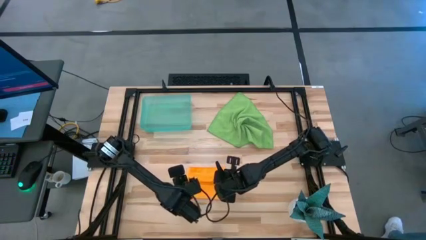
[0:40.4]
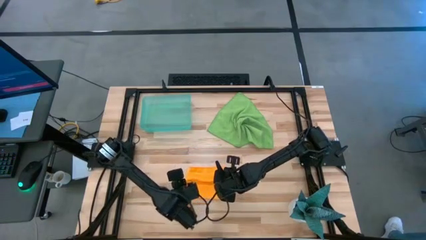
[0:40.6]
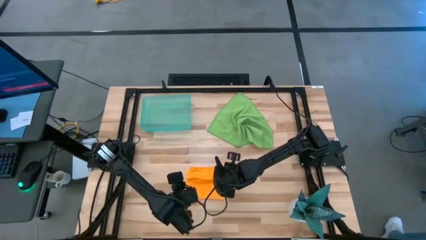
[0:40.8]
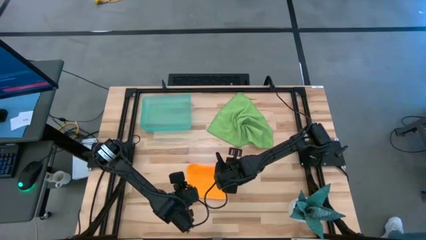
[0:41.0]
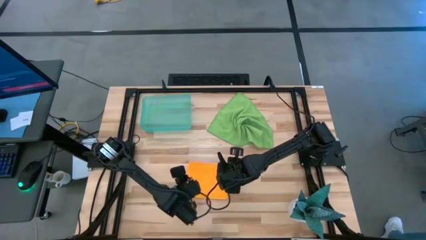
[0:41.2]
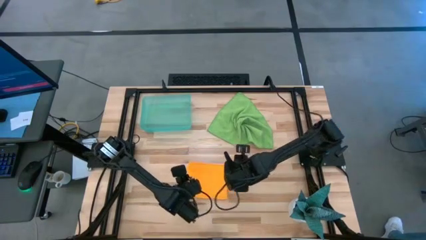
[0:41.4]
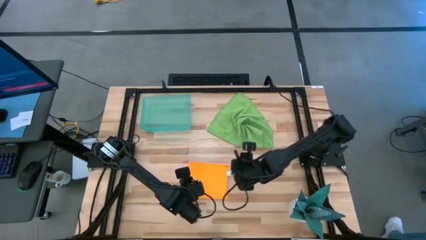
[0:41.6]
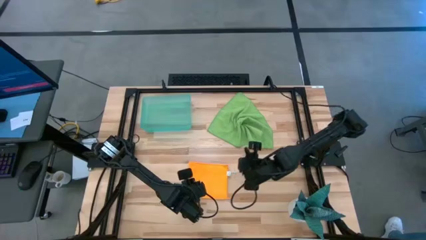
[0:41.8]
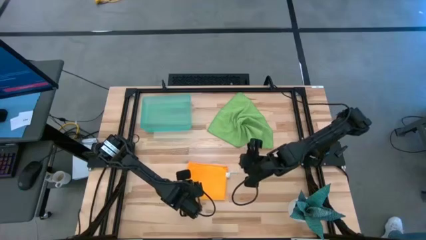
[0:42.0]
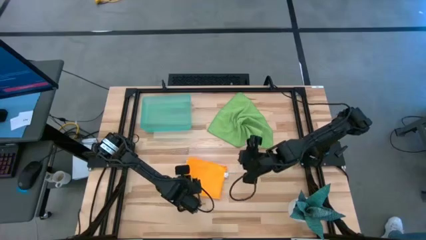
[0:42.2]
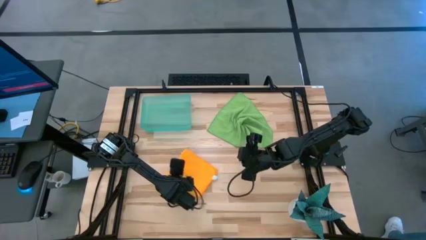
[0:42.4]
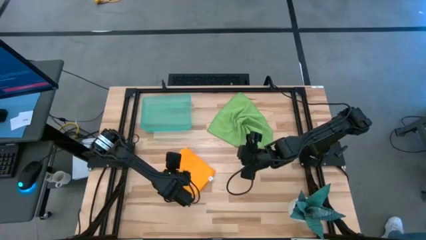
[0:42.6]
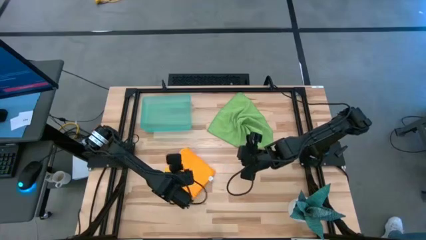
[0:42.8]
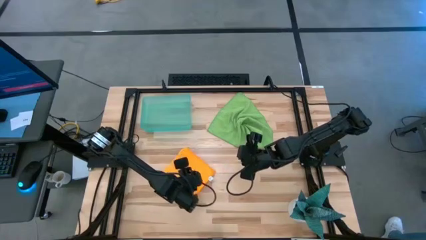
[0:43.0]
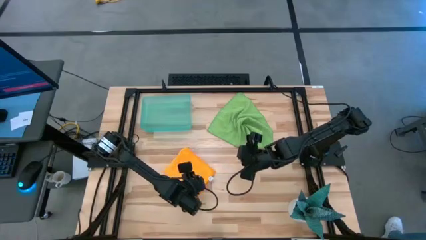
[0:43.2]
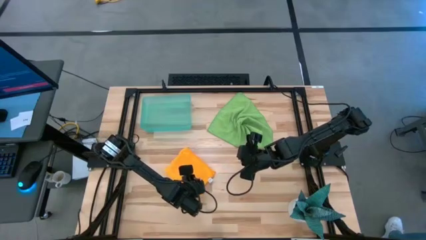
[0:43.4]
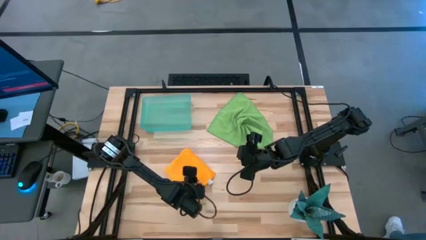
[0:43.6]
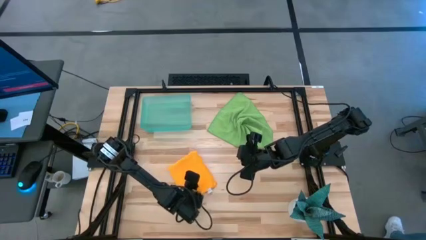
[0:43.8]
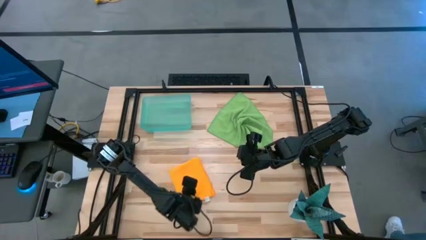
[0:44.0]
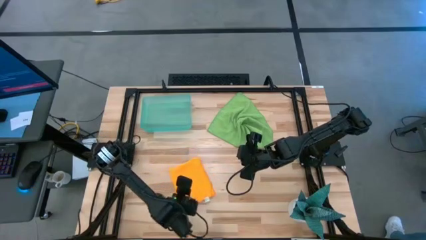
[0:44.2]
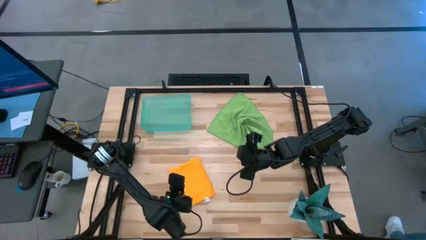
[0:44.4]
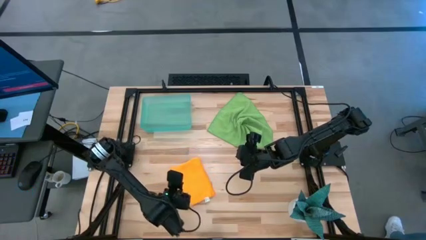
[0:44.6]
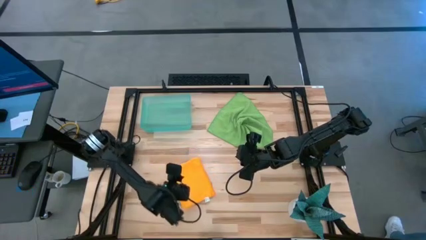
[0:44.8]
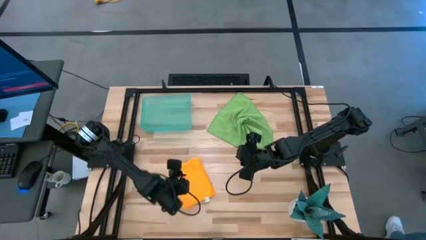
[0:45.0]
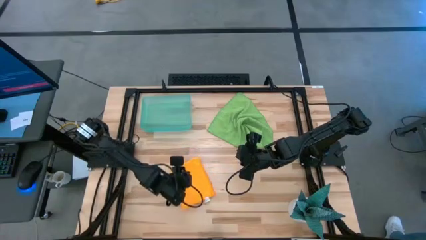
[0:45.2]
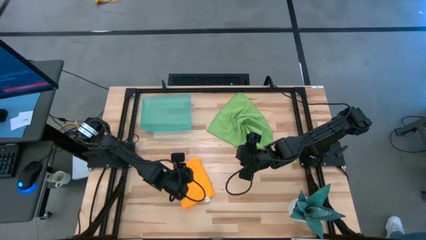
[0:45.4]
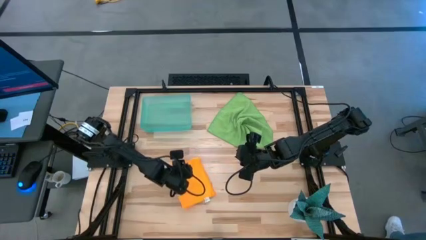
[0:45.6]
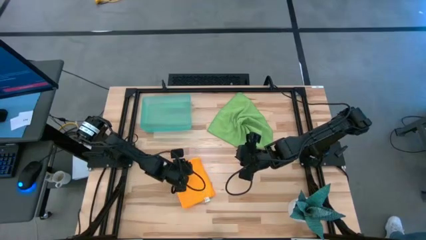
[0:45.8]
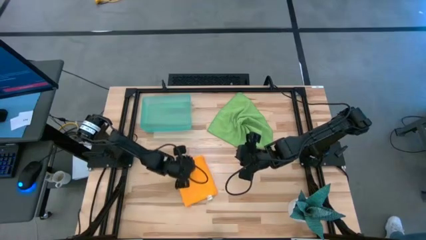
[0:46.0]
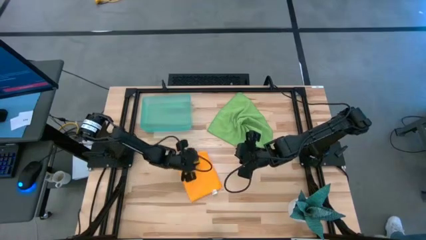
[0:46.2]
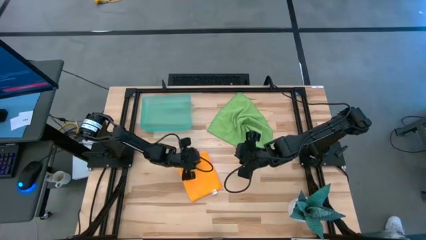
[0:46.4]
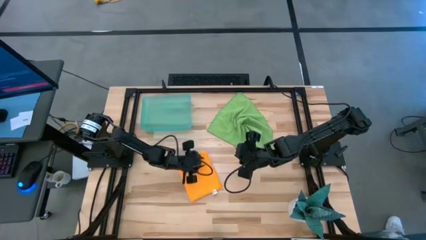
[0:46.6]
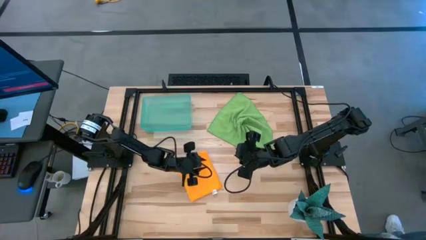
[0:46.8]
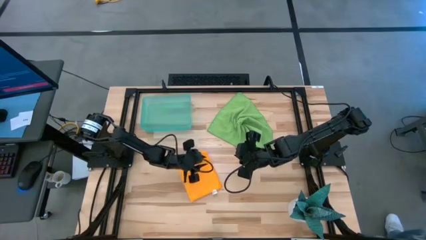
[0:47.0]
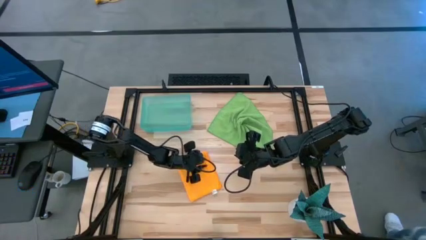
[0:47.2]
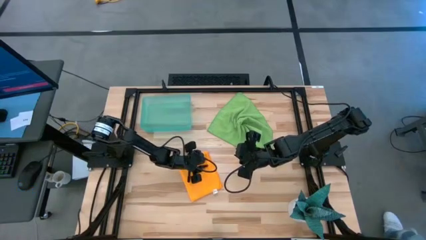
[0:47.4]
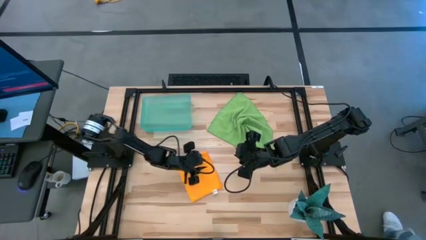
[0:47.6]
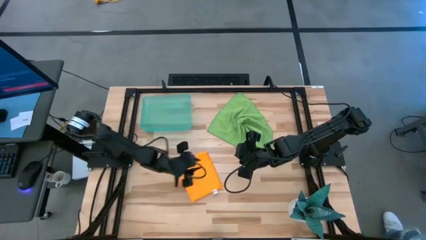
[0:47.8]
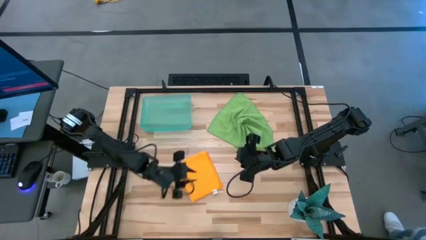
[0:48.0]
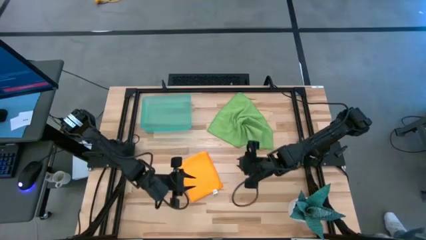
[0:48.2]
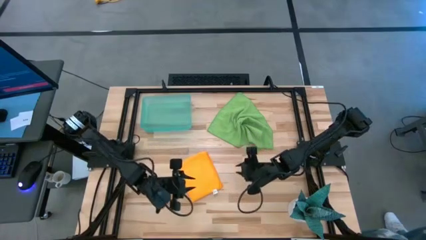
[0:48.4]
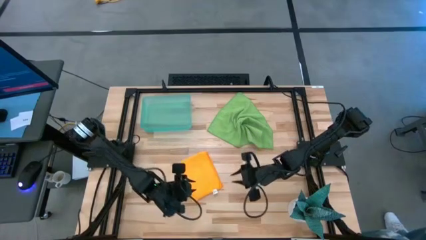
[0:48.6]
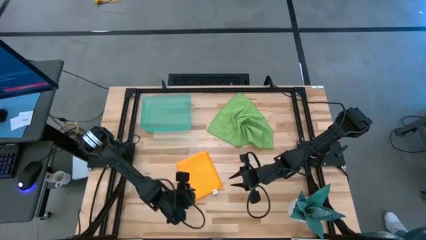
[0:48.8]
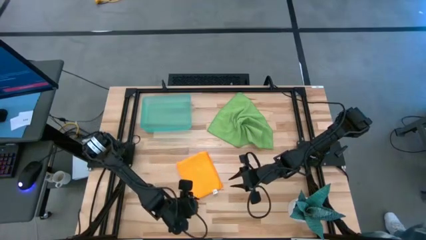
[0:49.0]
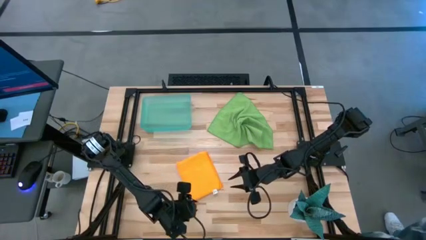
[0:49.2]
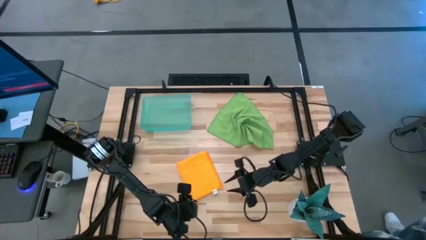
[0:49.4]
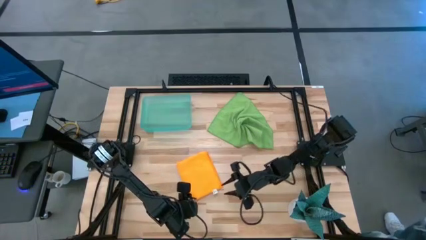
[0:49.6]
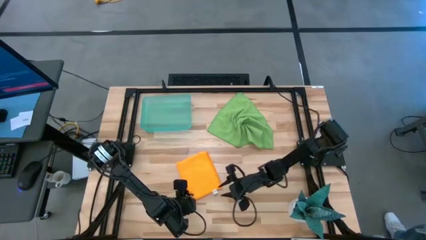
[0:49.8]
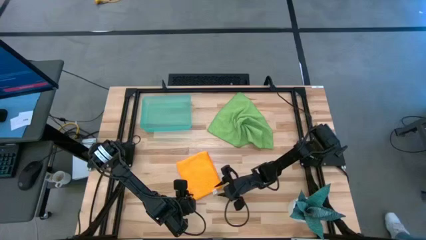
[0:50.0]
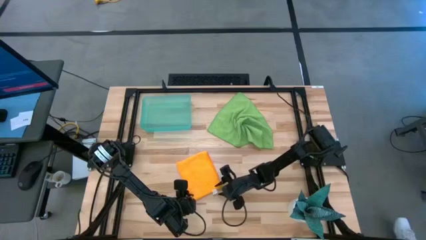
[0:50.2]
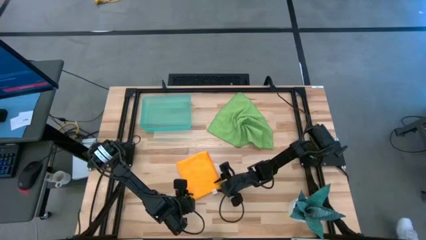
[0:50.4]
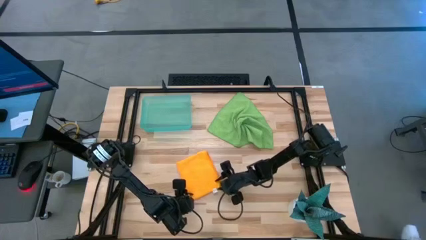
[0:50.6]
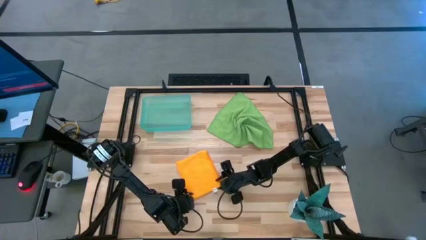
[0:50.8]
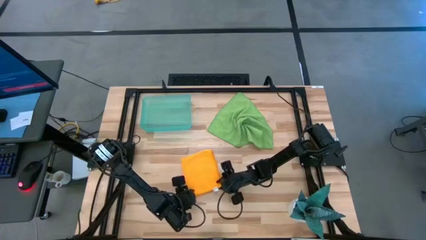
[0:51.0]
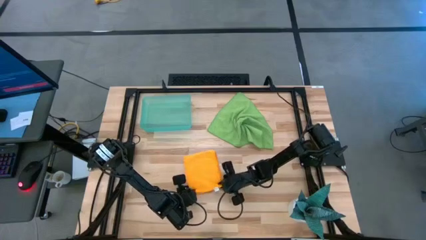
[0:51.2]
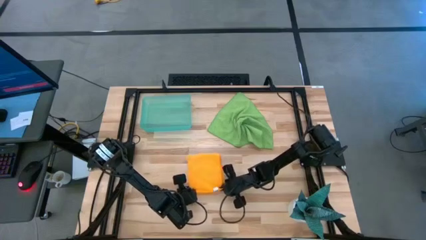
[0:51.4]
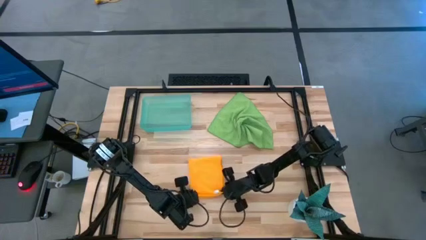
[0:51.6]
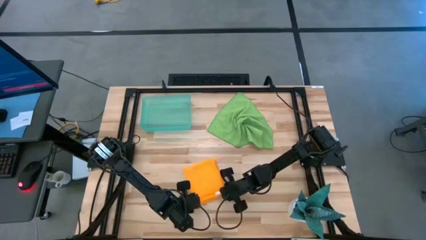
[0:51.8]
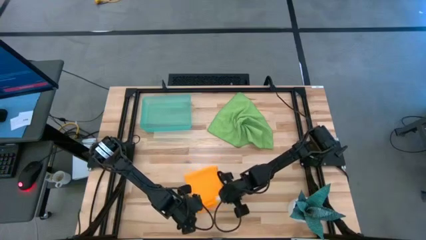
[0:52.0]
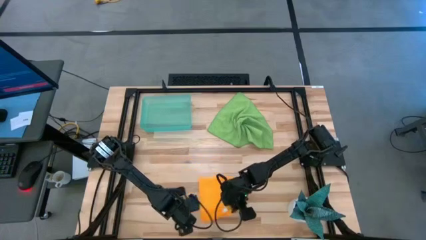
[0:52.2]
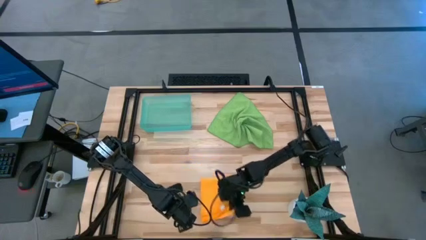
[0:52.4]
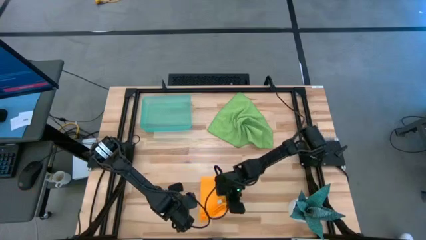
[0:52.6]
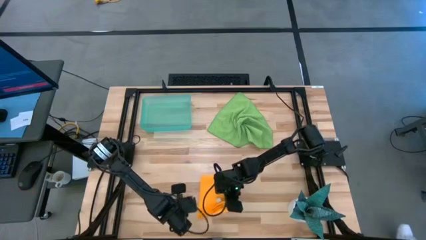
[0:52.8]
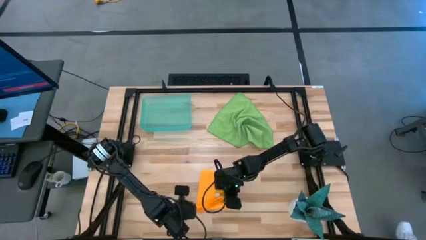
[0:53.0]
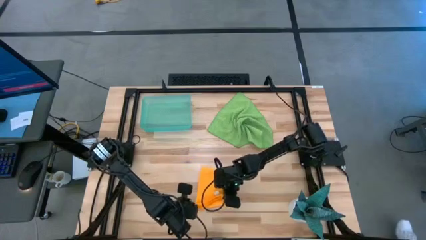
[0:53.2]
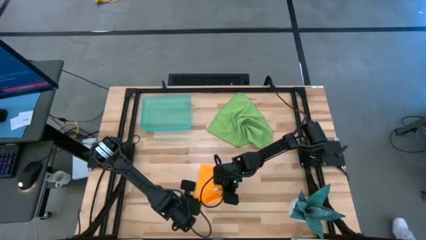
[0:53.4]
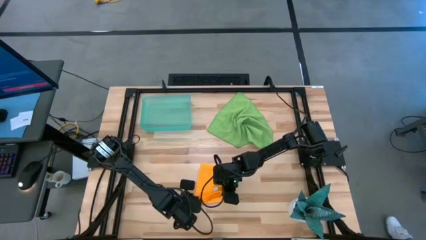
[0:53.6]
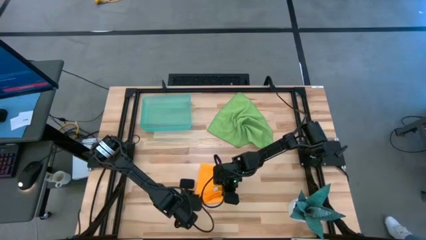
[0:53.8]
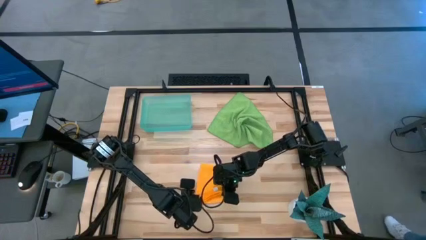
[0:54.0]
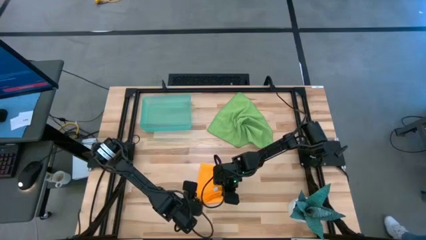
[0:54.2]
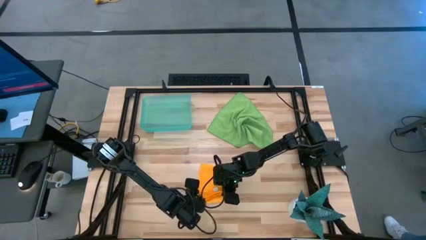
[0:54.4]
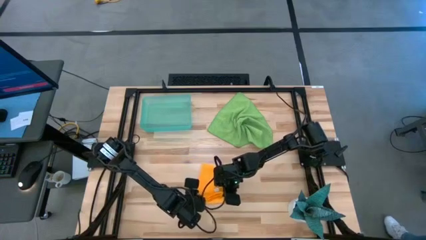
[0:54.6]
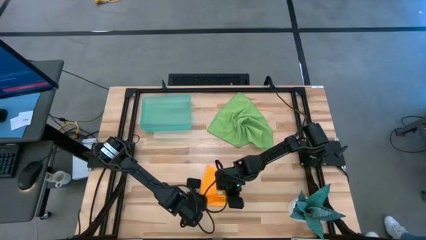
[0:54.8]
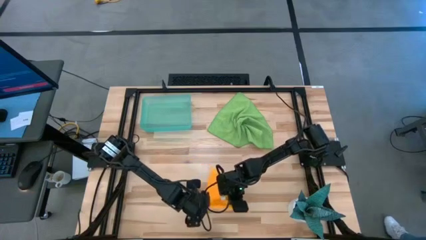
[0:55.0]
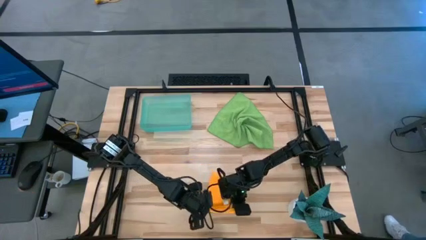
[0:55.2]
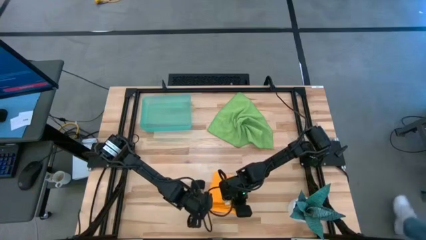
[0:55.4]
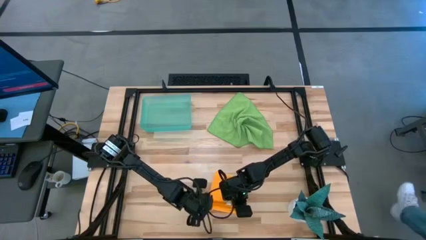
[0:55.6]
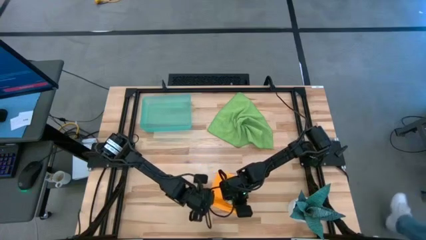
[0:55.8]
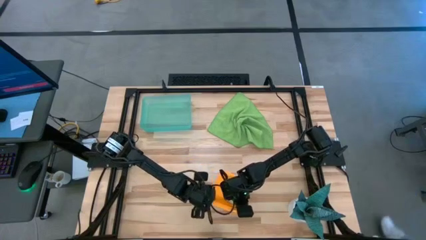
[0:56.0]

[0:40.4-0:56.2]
Task: Roll microfiber towels into tight, uniform cylinder then place into a basket
Roll the yellow towel
